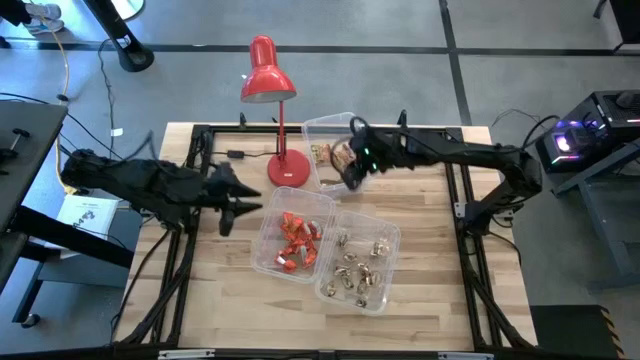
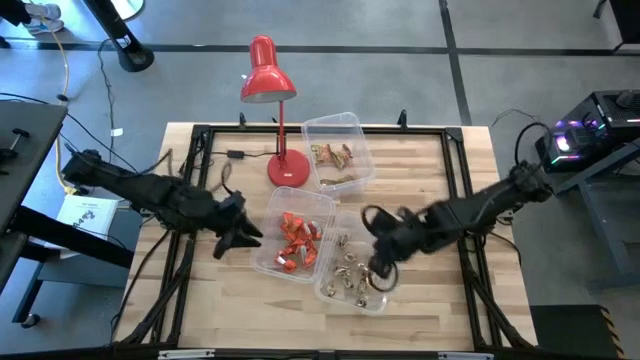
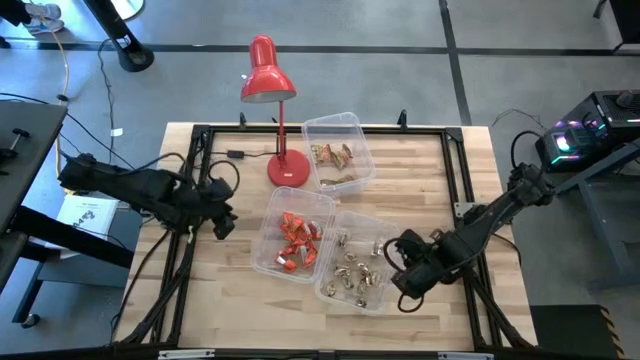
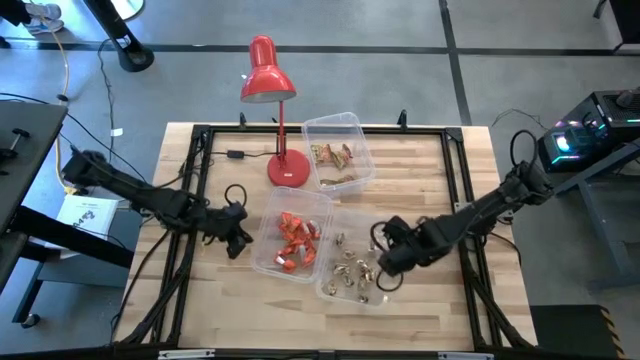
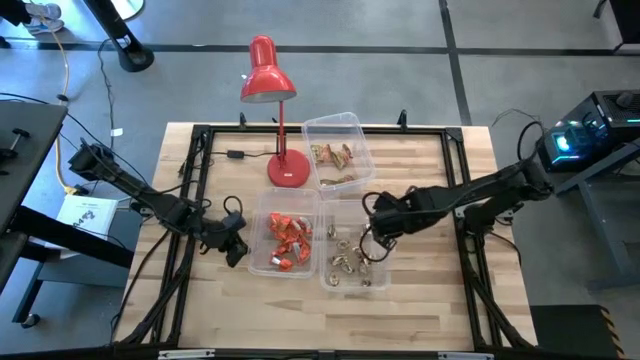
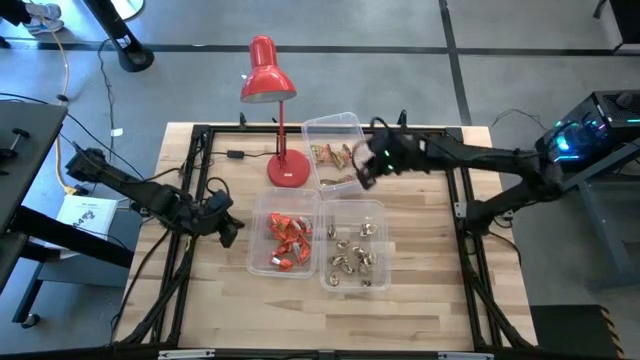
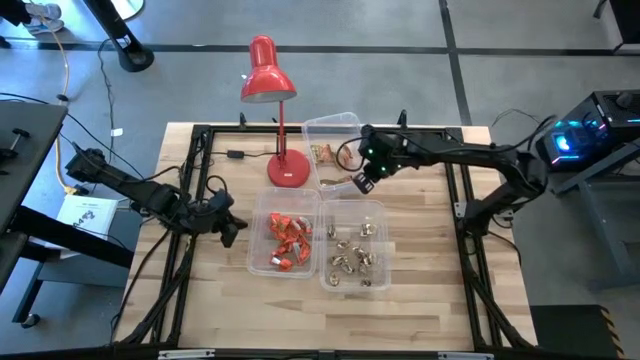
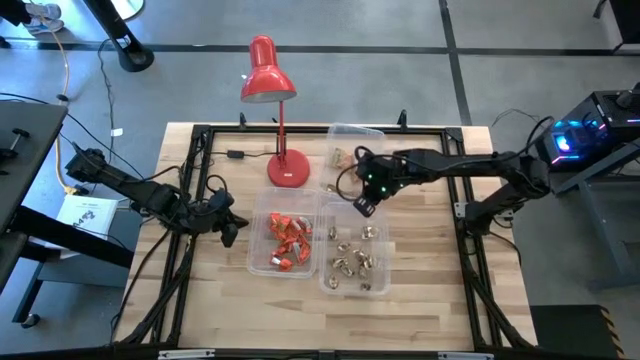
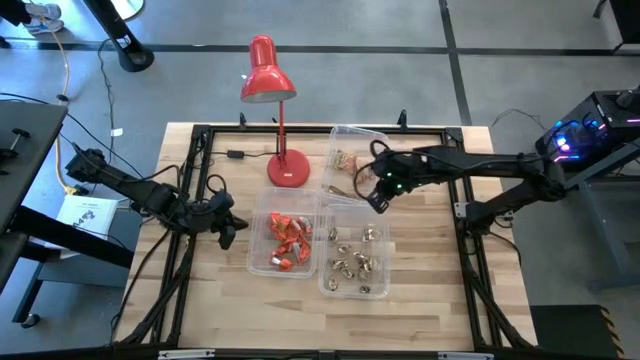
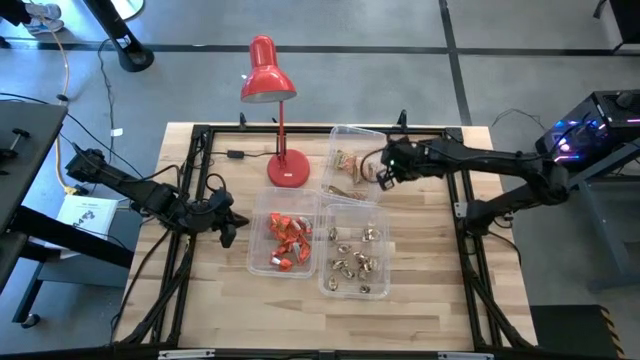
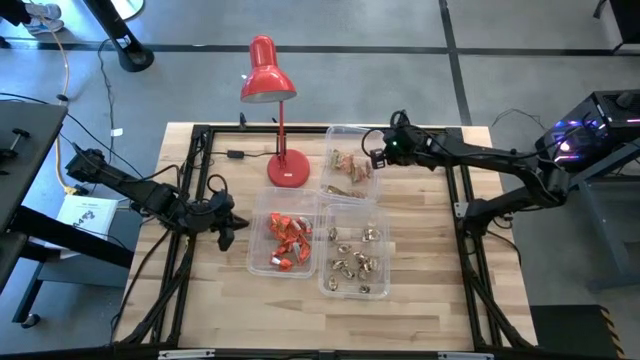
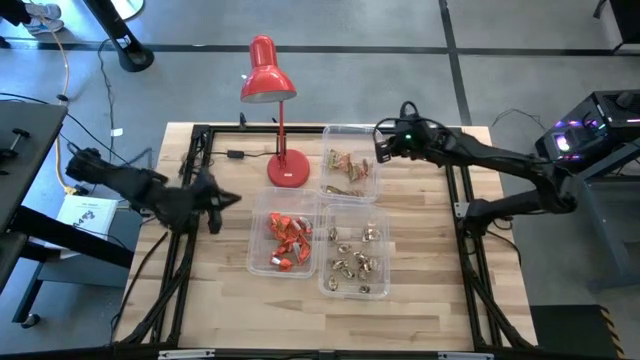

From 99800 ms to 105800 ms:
Task: Sort candy
Adjust the transparent bins

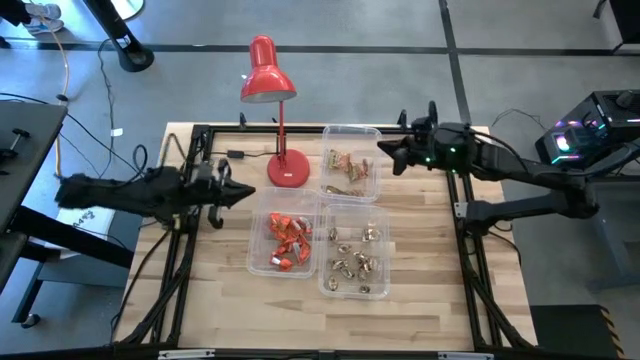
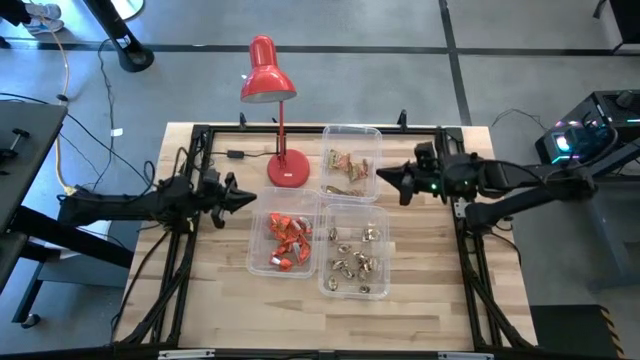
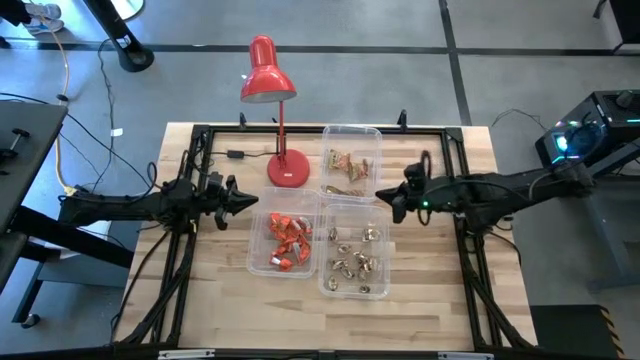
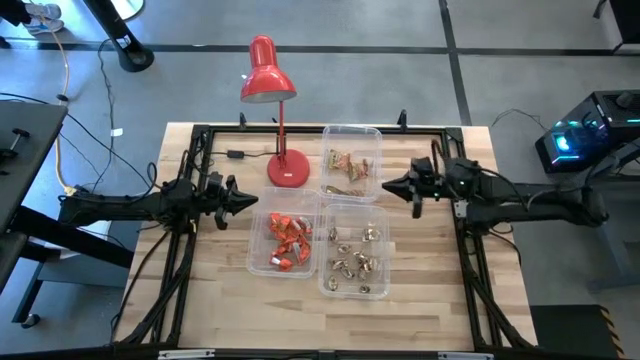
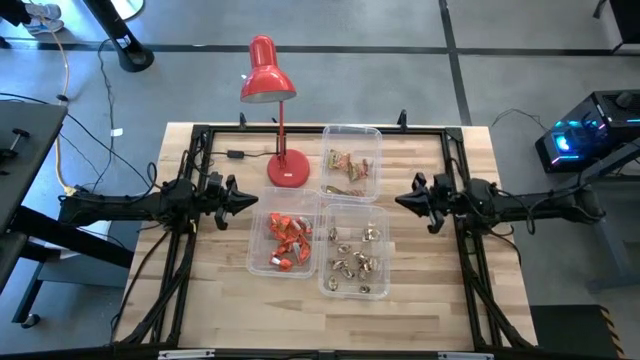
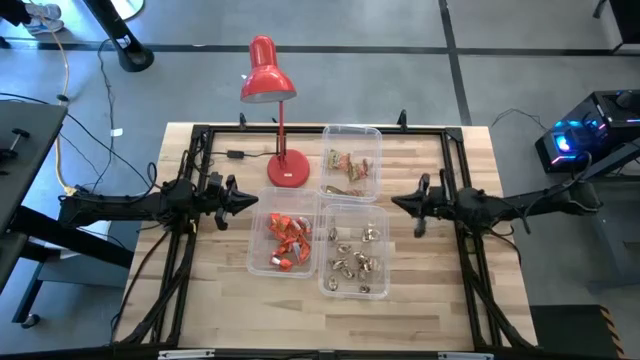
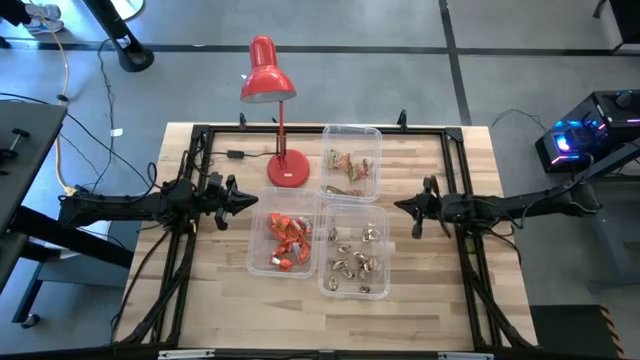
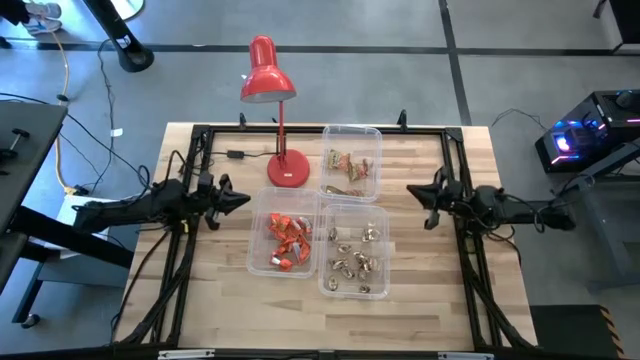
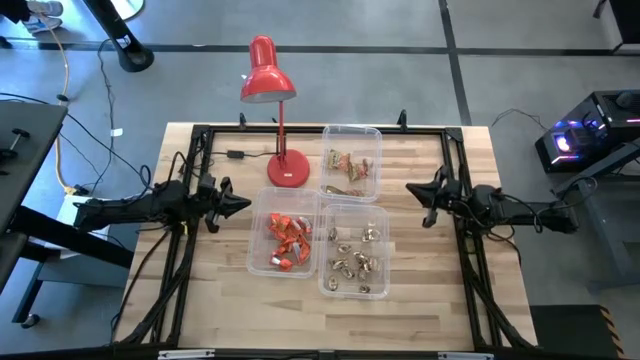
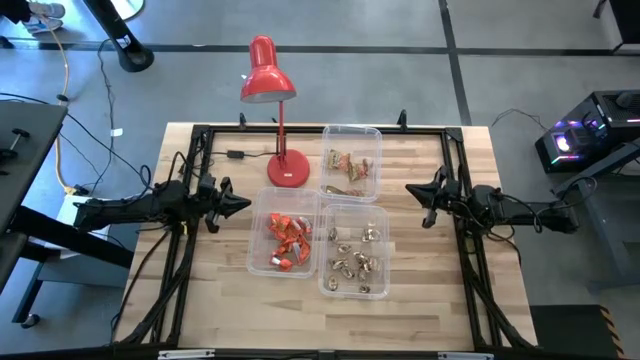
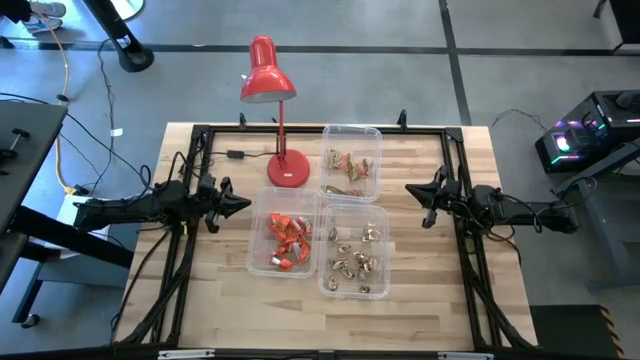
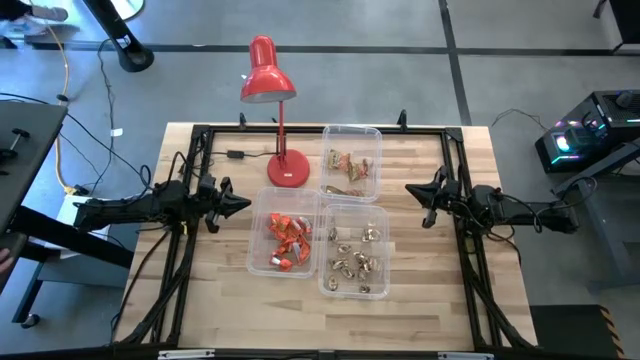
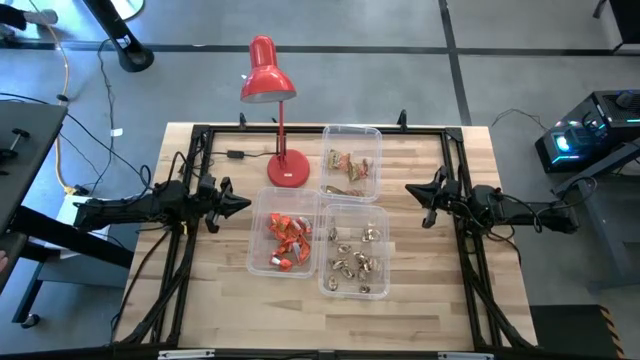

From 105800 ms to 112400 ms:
Return to Home Position

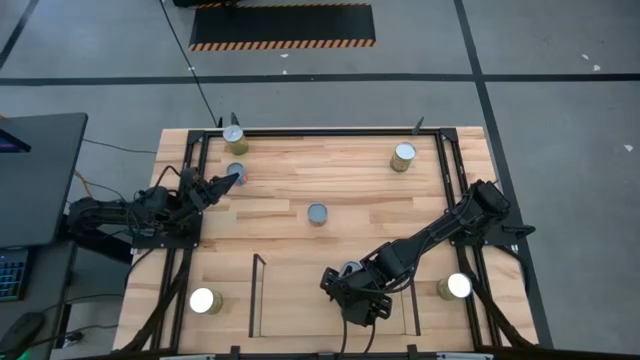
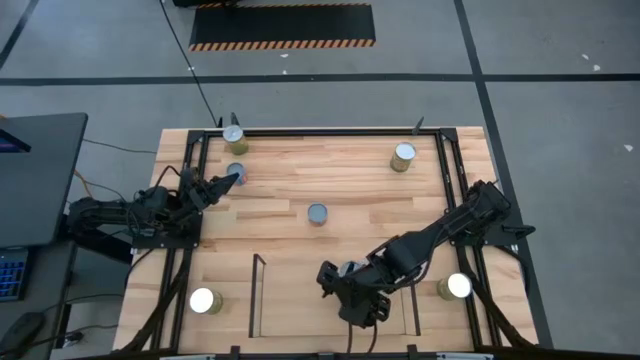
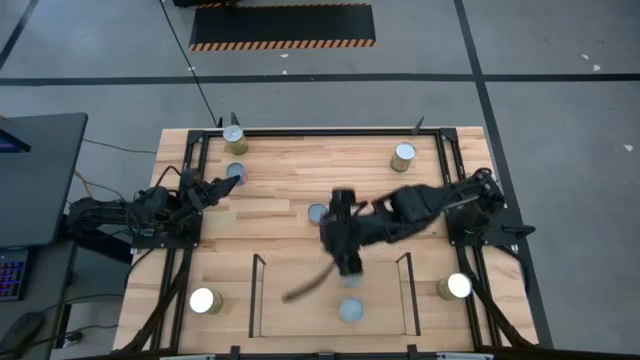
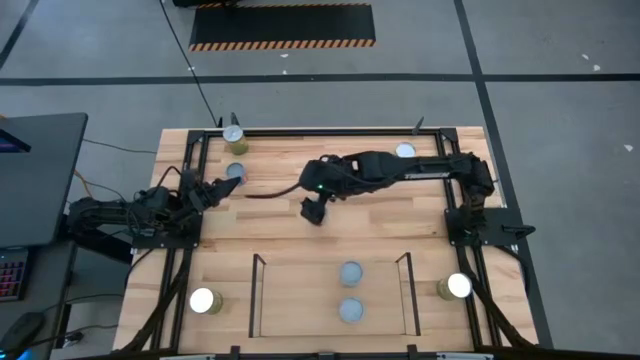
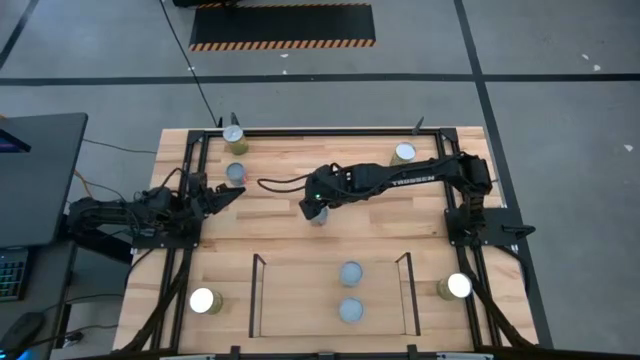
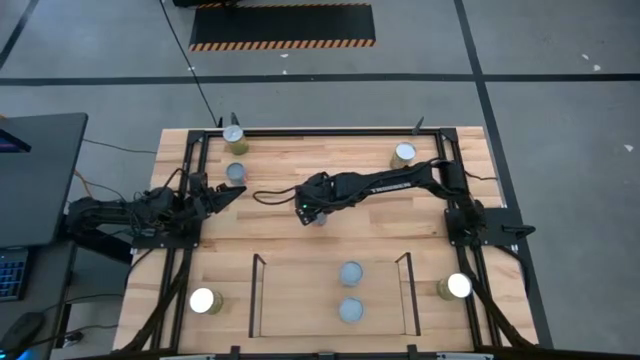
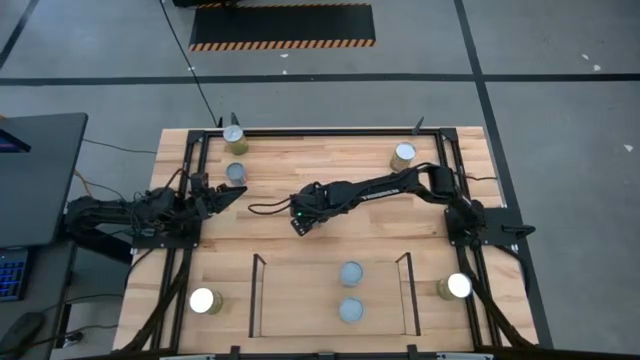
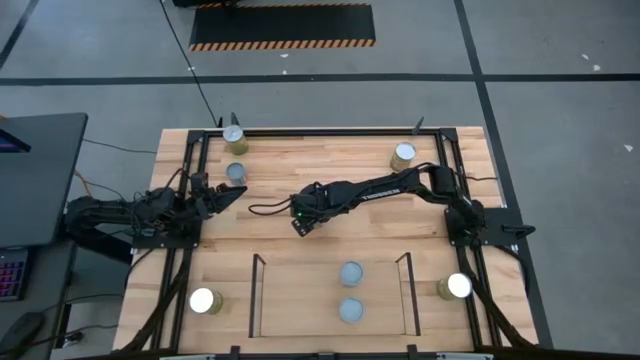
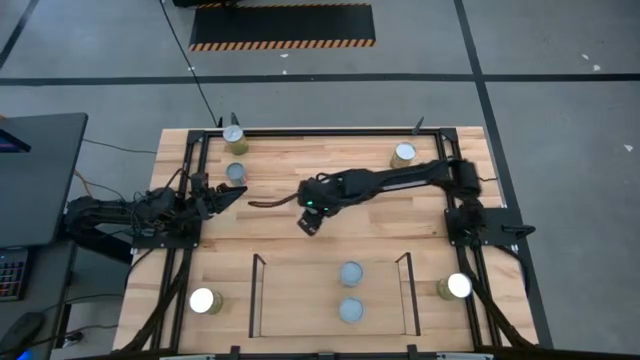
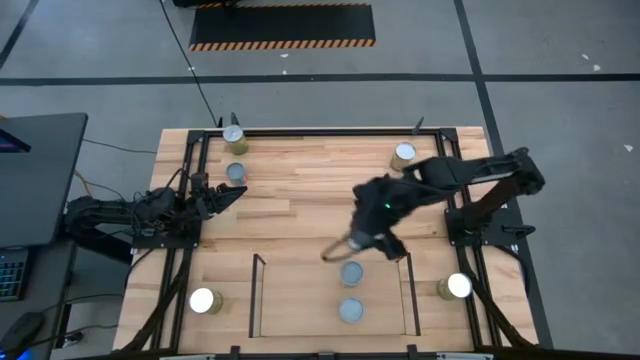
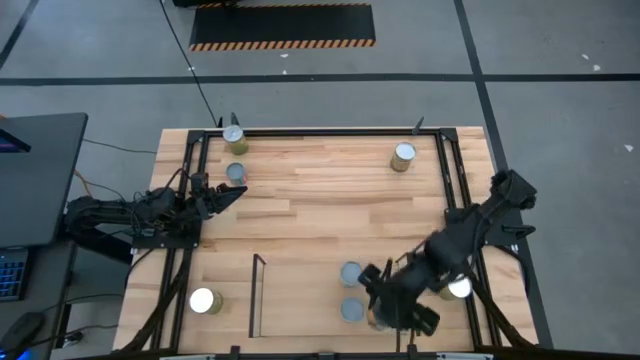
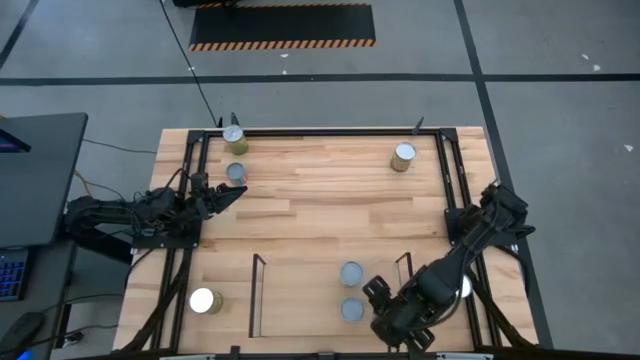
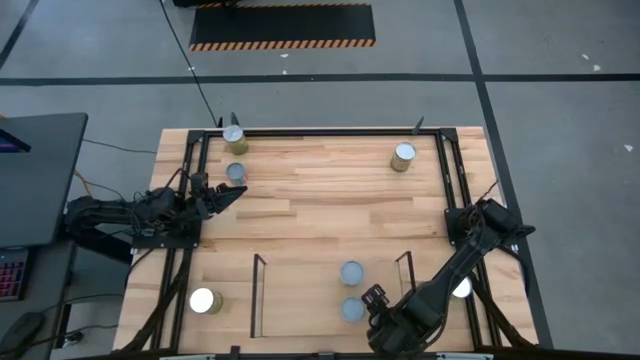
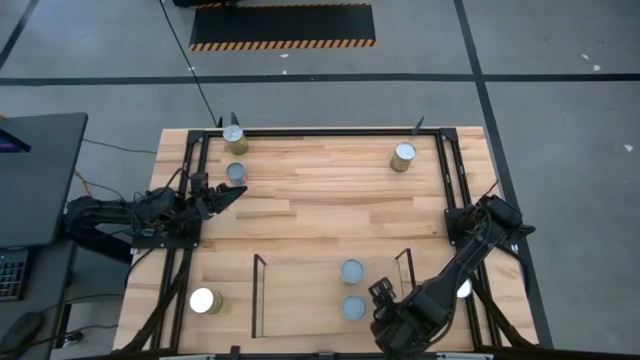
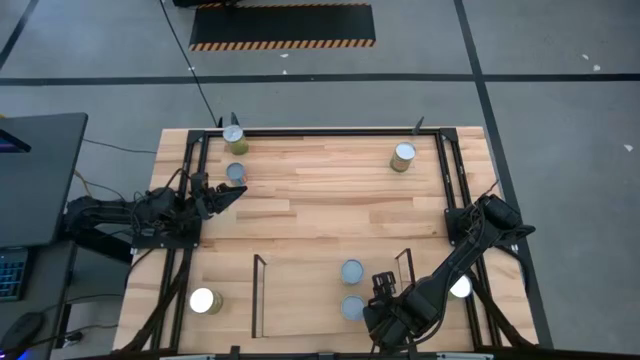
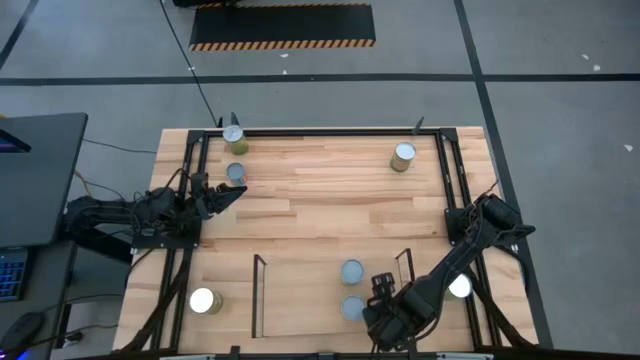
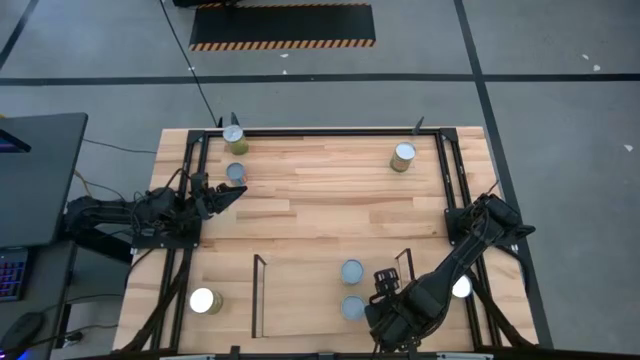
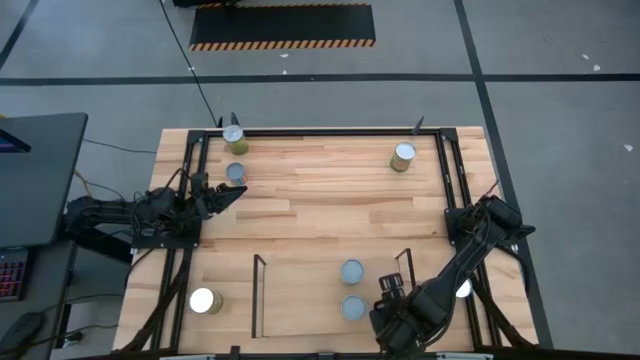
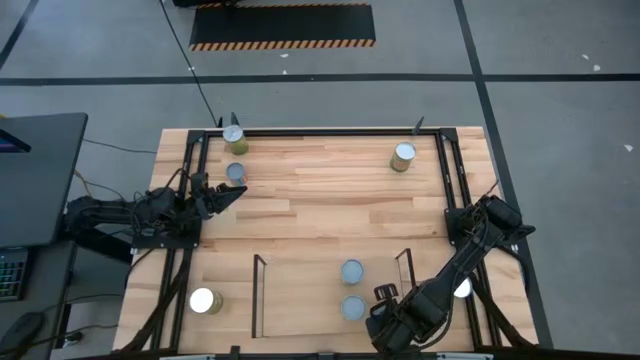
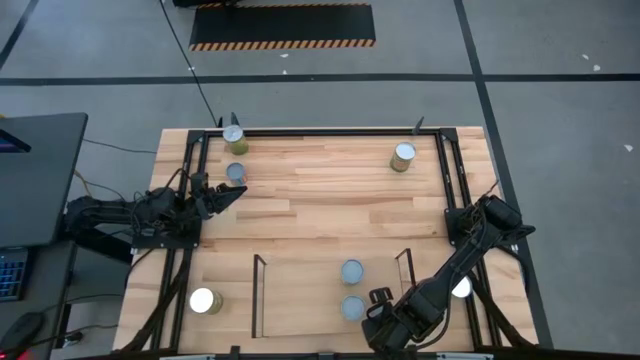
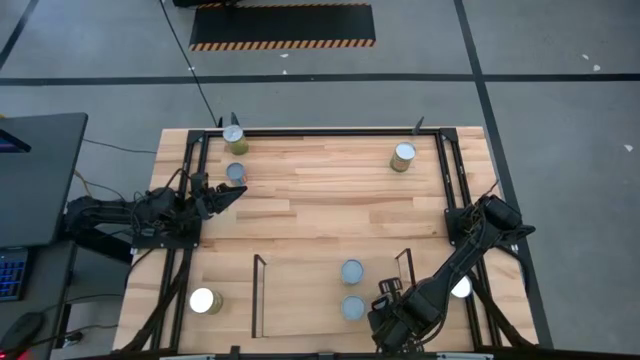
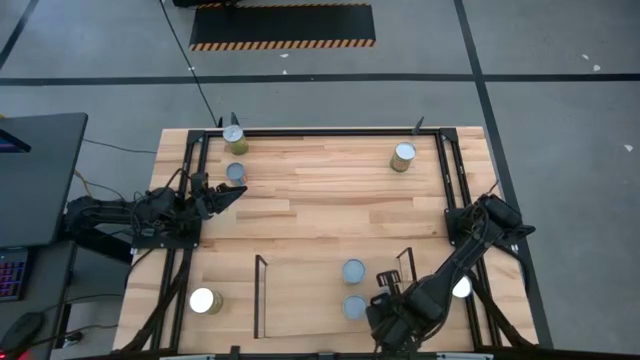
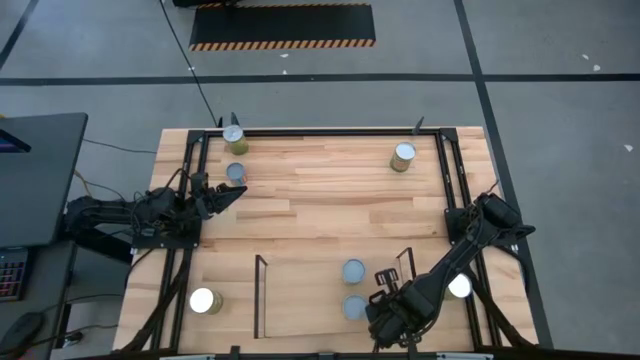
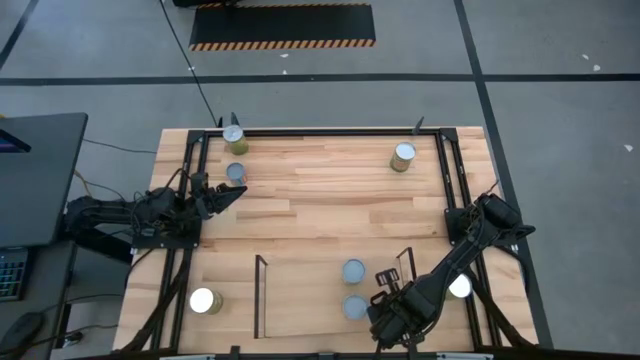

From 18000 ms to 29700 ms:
Task: Pick and place cans onto a shelf
Put the canned sliced oranges on the shelf
